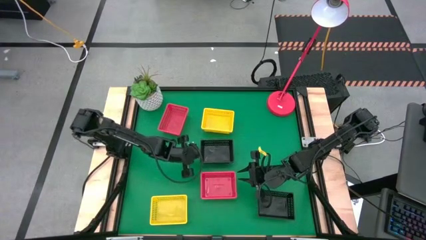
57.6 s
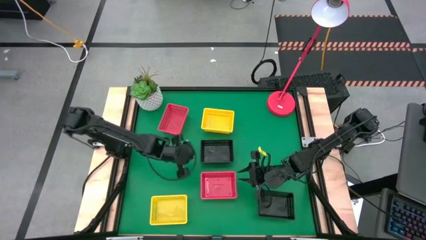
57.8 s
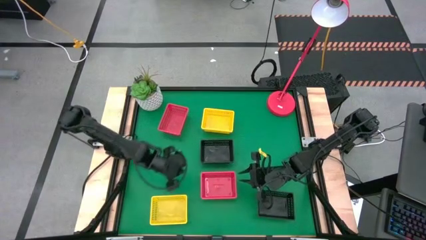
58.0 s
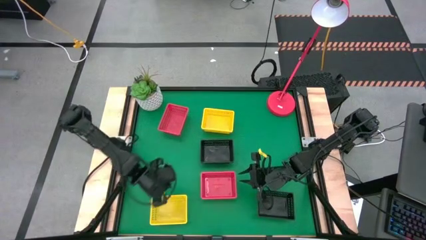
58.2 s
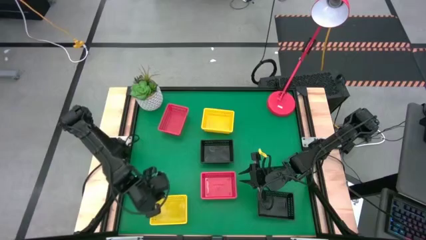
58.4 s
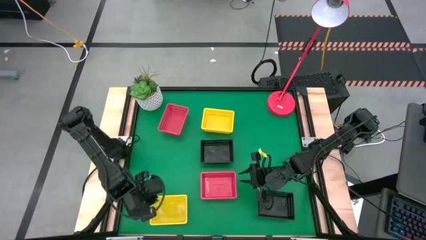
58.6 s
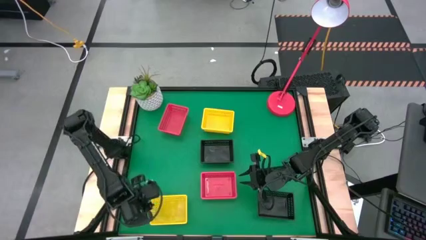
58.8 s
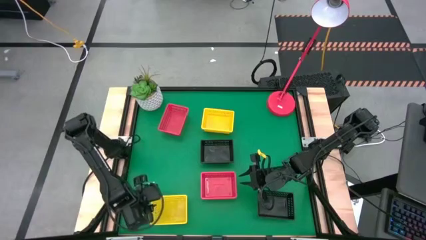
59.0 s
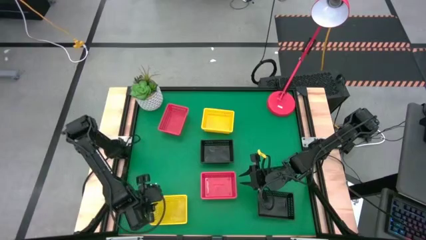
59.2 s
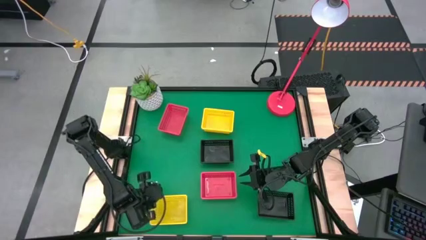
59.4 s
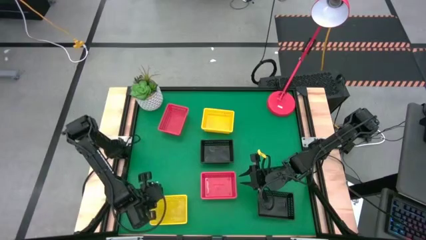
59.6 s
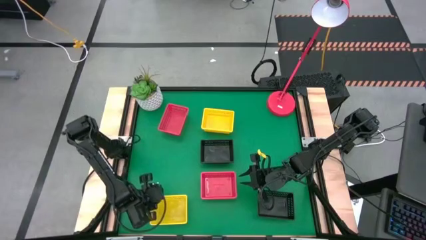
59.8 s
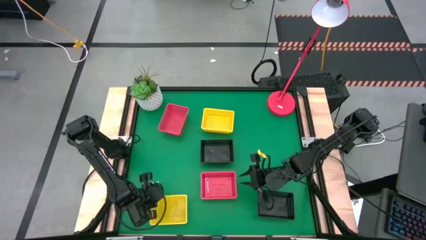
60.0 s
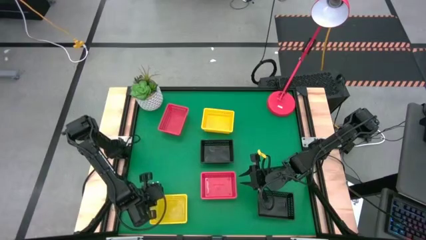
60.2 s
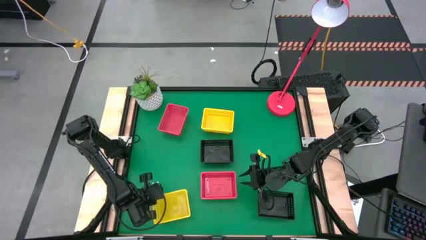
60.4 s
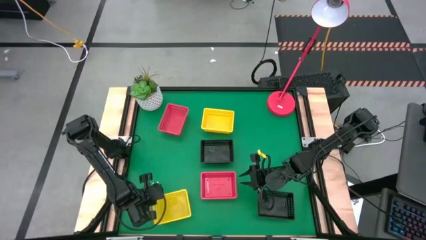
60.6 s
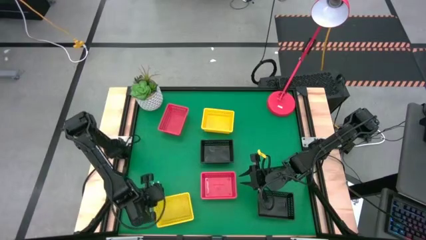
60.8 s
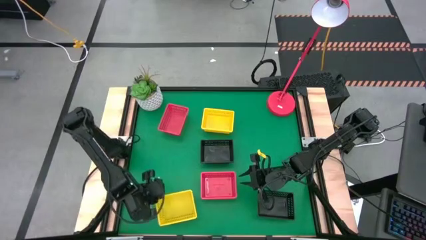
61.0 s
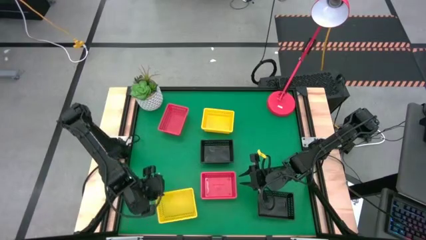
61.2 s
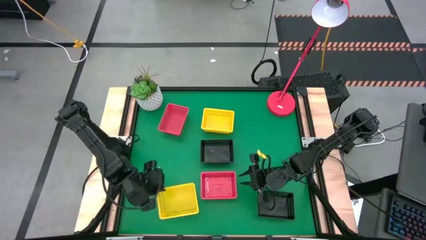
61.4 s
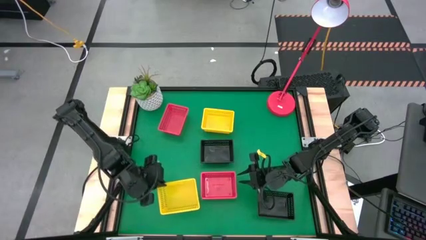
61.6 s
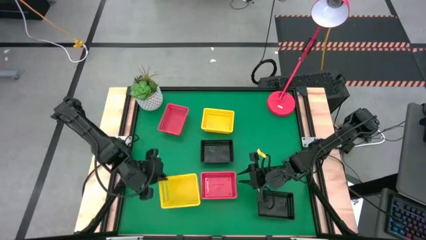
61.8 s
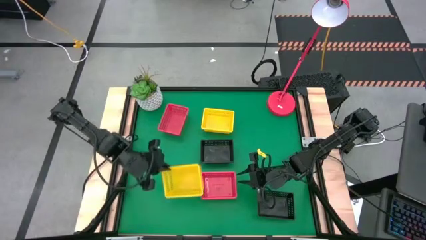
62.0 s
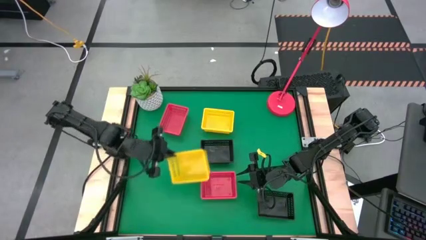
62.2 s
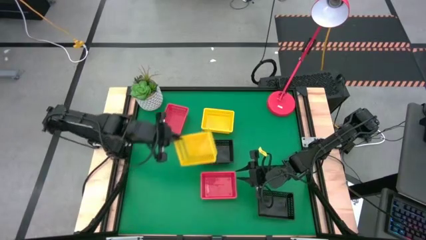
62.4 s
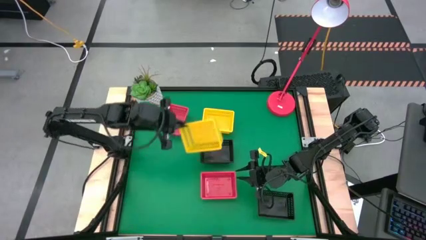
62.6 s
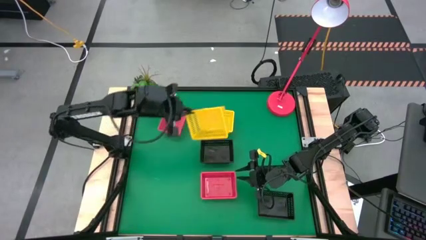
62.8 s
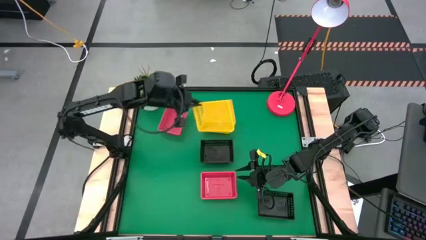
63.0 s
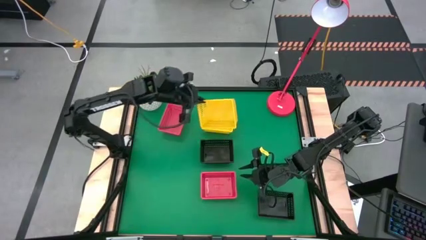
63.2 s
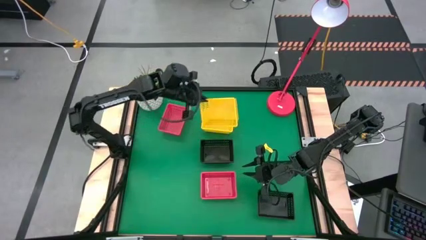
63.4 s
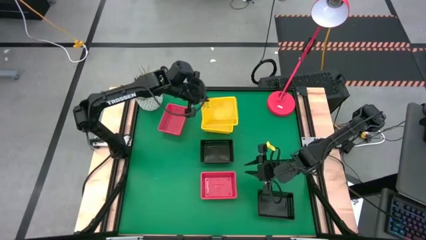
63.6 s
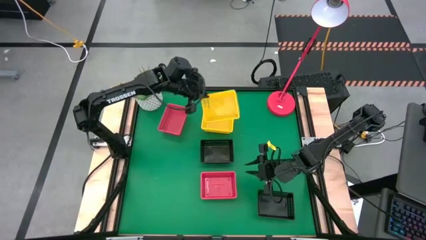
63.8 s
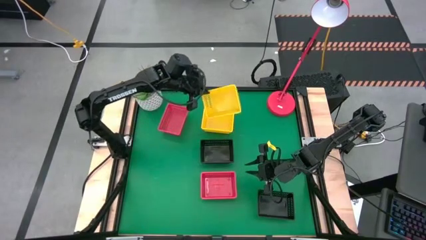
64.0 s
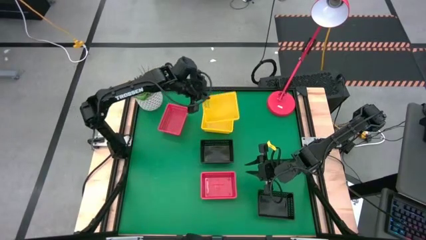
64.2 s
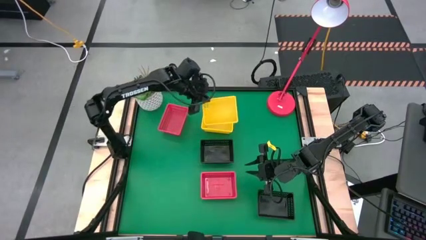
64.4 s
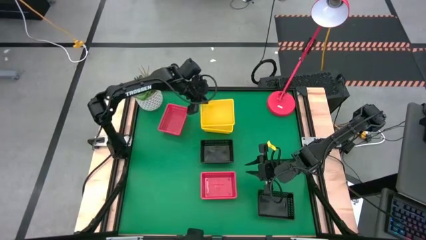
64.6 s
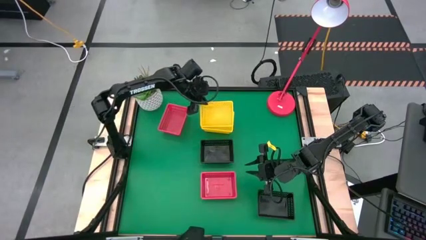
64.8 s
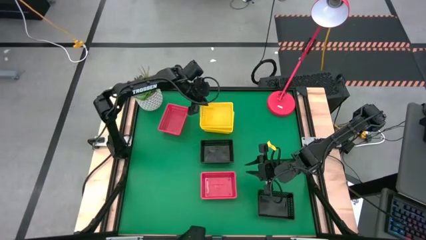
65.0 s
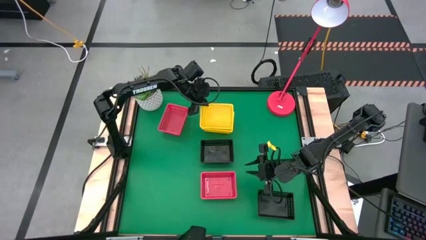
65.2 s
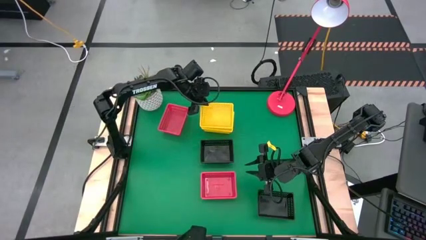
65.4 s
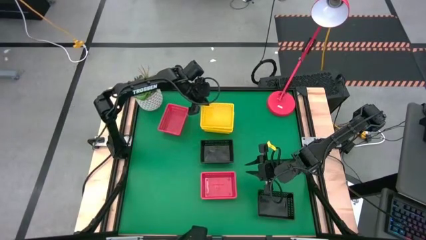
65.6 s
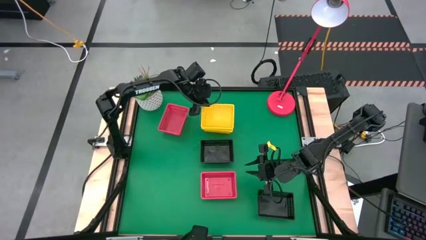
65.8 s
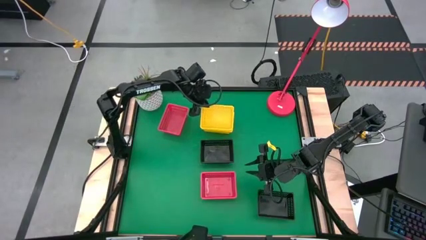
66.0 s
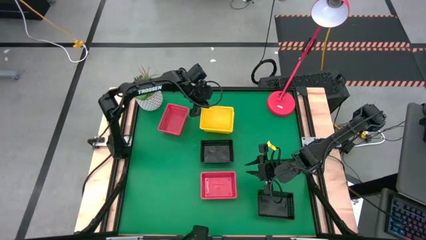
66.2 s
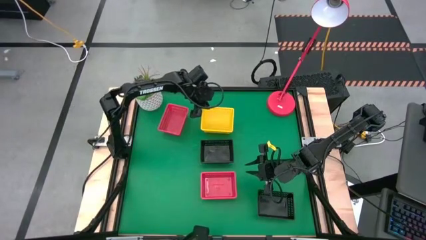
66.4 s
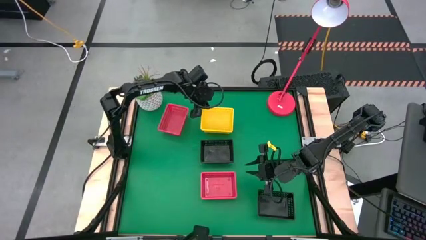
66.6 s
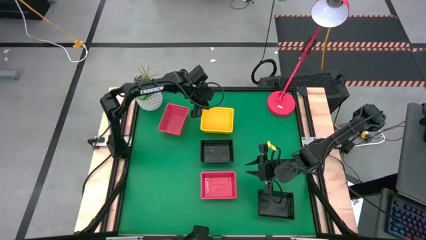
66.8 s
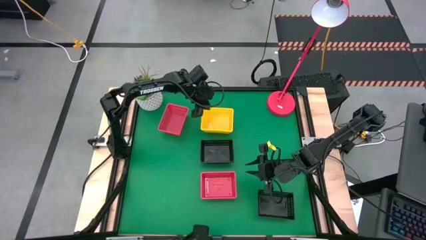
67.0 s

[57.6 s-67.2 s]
Stack the bottom yellow basket on the top yellow baskets

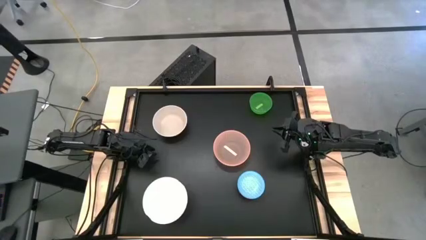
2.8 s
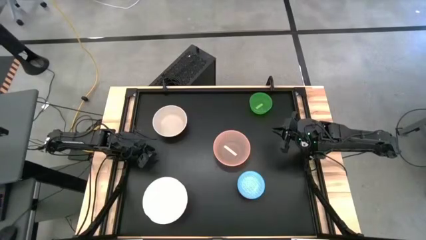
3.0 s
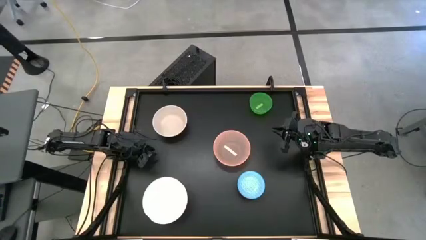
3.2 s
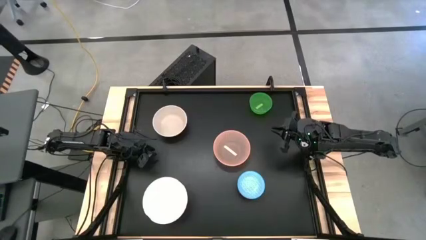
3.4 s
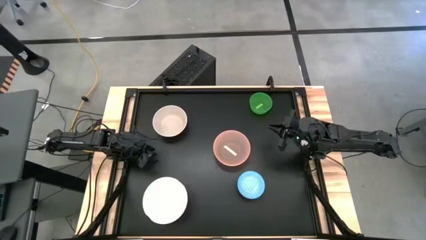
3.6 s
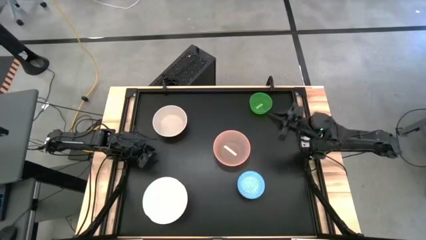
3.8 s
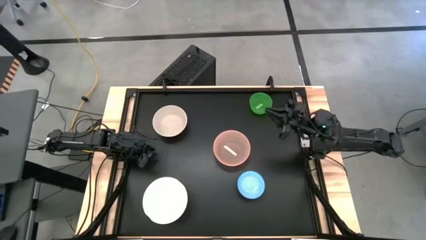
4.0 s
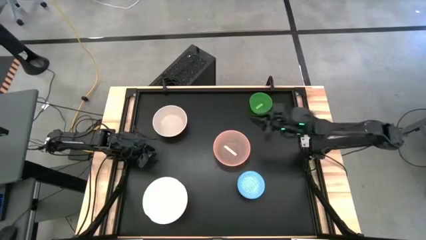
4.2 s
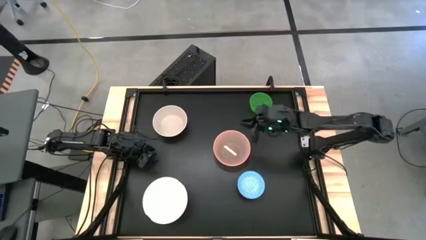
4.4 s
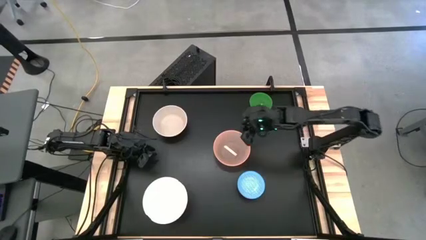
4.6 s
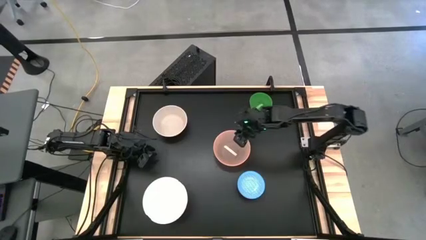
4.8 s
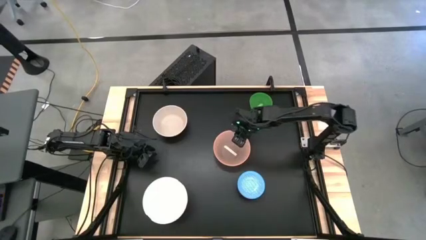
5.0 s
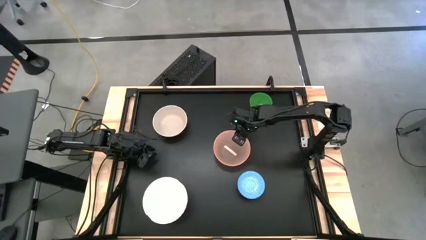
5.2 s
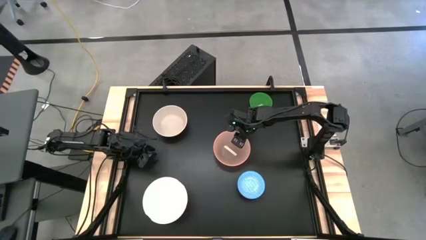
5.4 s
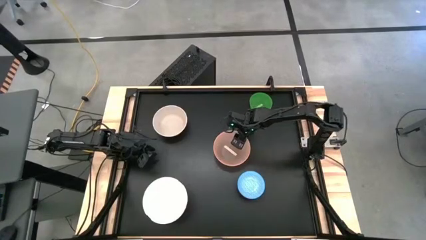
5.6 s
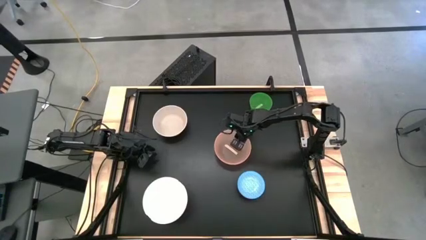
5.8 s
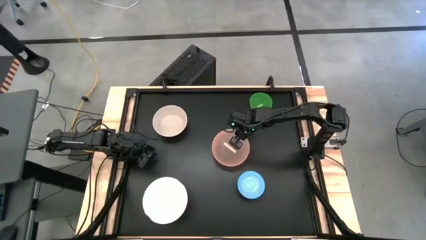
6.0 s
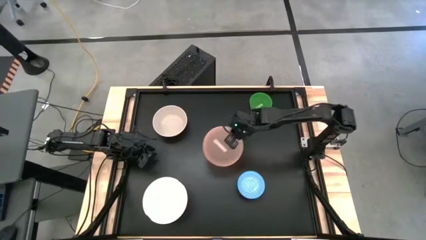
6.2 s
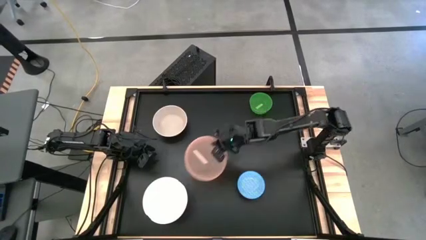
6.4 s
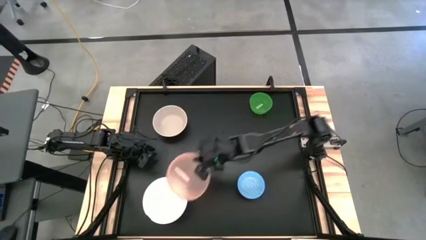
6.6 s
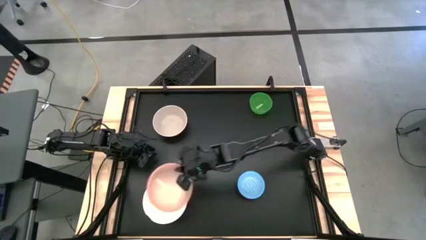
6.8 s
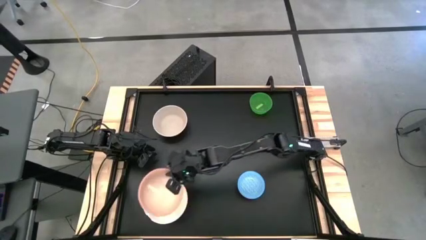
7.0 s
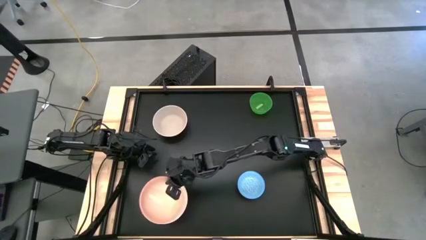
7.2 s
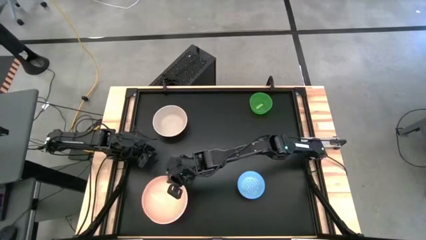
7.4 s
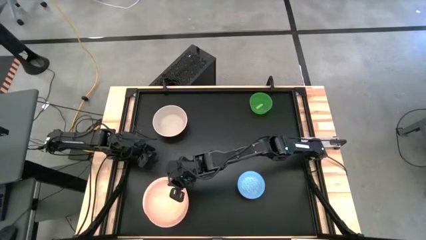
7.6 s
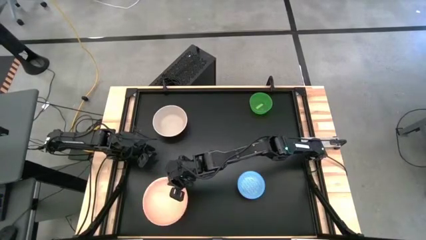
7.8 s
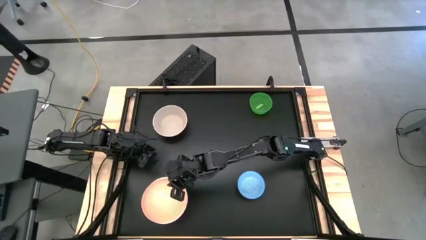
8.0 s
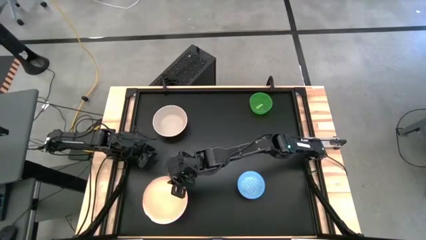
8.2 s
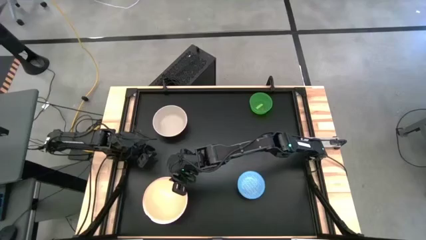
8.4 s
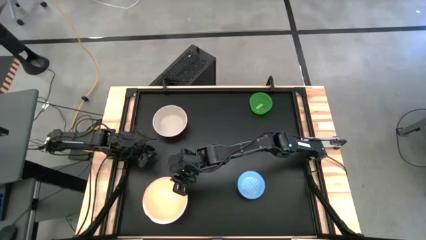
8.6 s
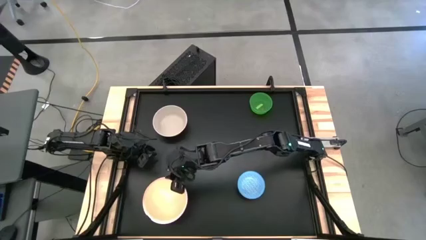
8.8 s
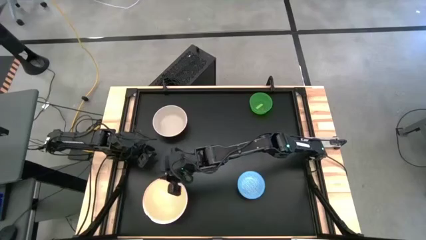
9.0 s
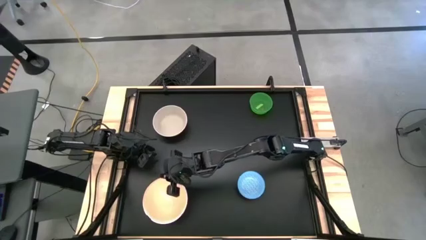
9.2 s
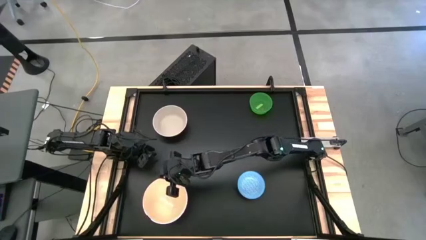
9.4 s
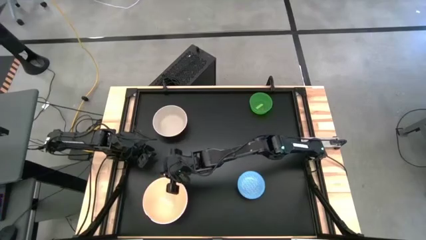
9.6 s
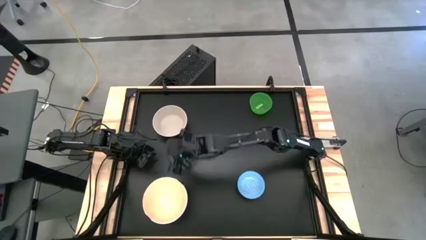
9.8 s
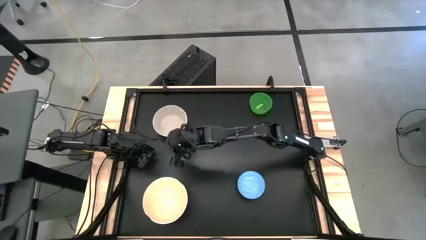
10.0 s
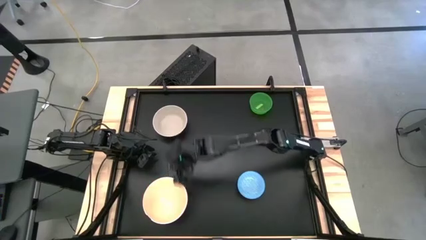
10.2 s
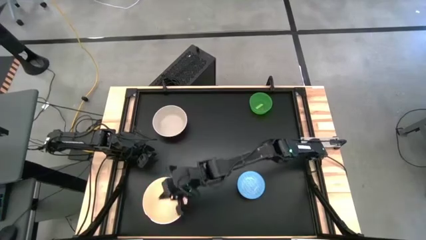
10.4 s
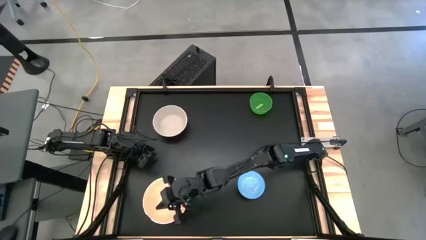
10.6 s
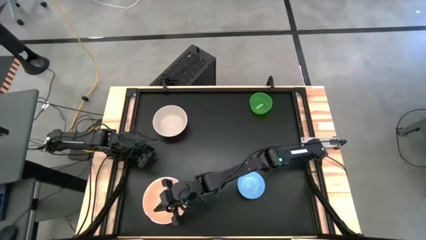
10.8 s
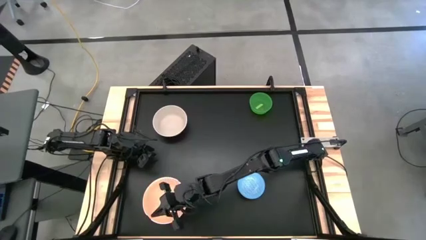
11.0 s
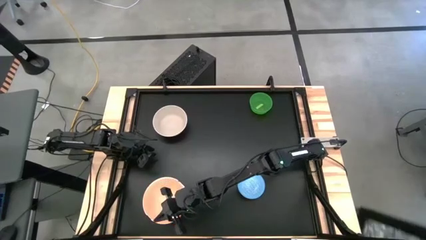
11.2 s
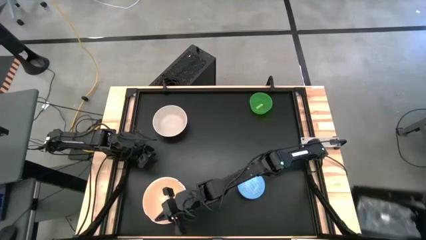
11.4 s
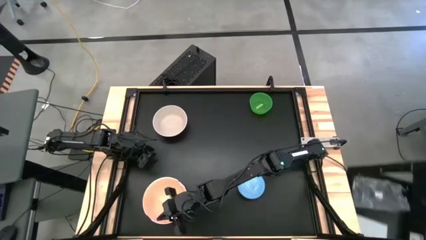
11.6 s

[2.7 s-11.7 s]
Stack the orange bowl on top of the white bowl
